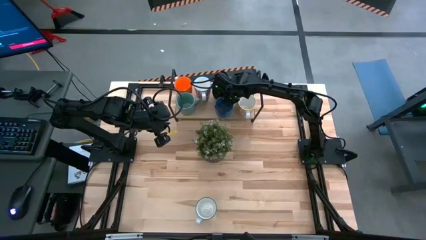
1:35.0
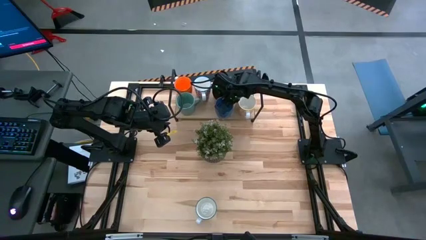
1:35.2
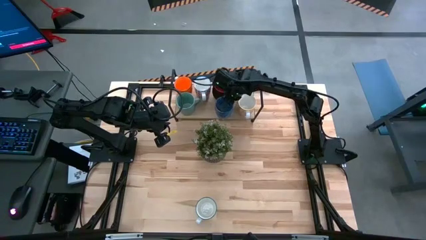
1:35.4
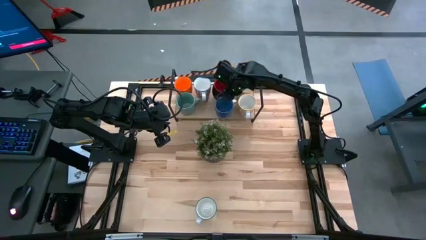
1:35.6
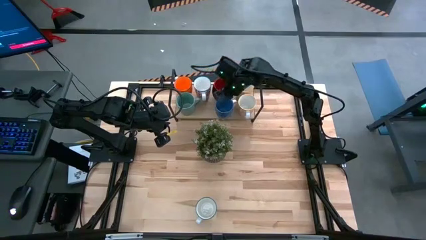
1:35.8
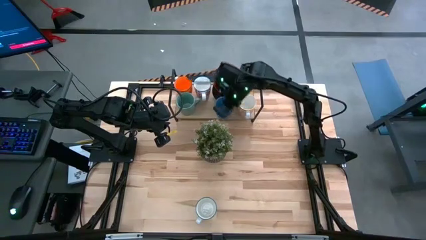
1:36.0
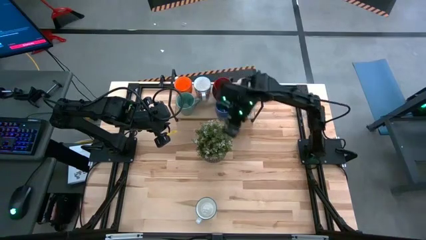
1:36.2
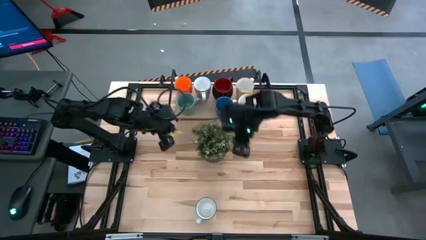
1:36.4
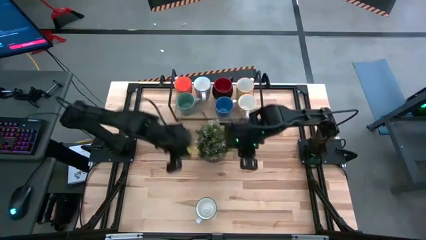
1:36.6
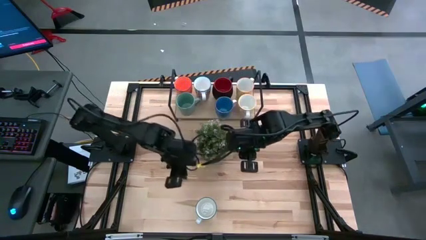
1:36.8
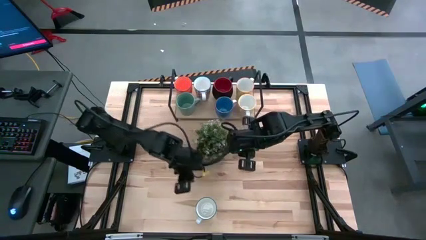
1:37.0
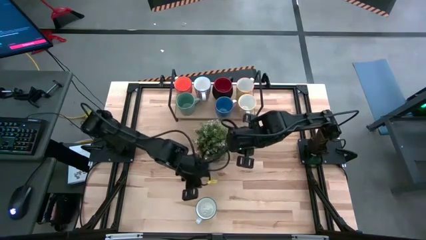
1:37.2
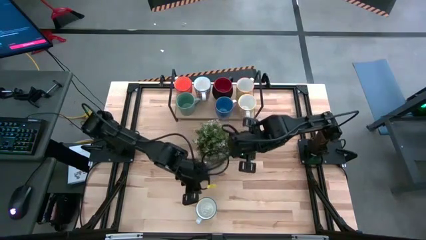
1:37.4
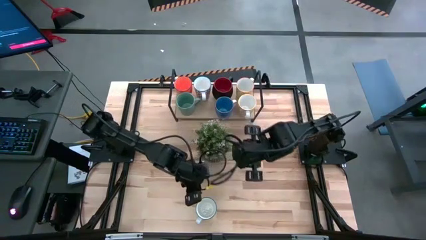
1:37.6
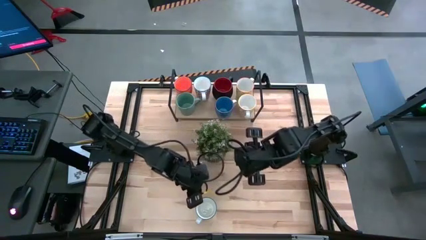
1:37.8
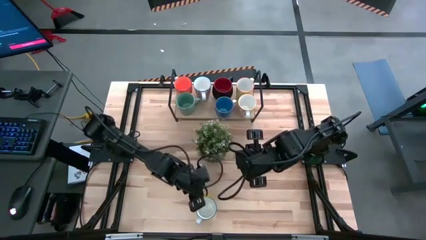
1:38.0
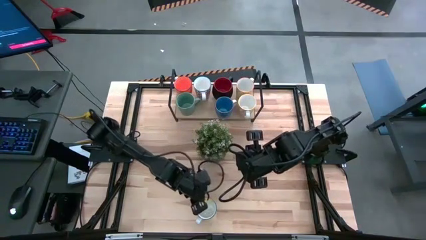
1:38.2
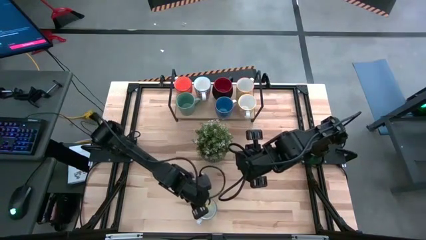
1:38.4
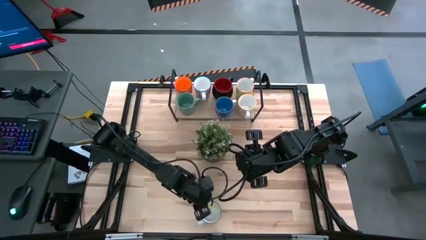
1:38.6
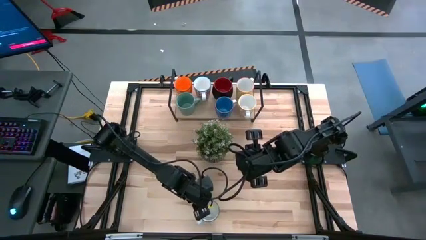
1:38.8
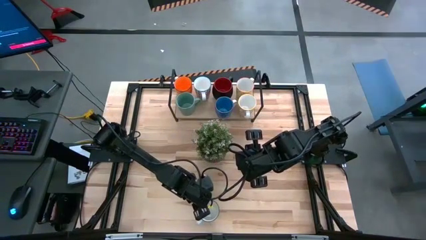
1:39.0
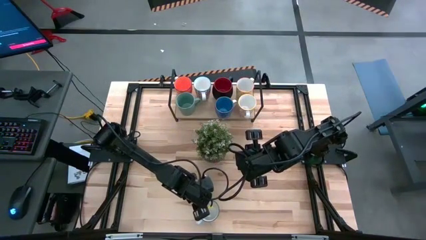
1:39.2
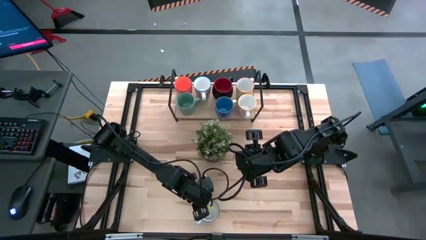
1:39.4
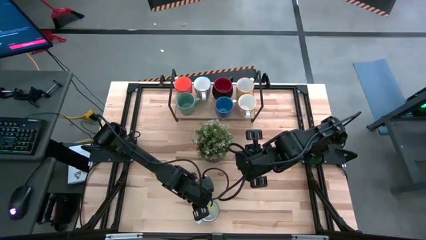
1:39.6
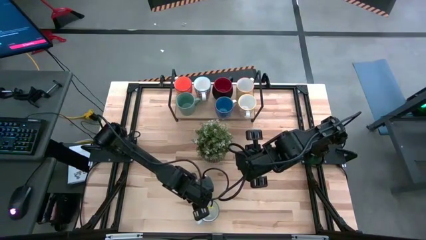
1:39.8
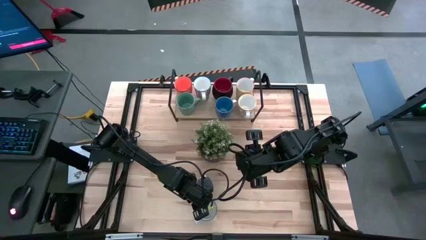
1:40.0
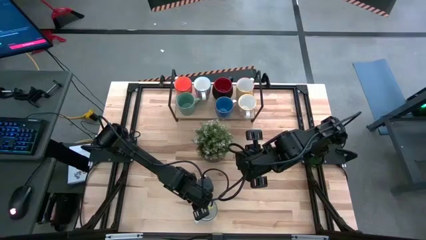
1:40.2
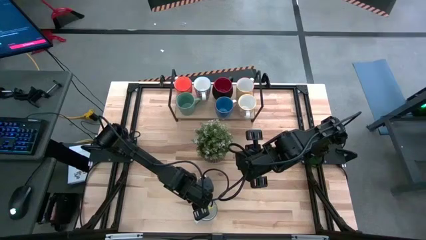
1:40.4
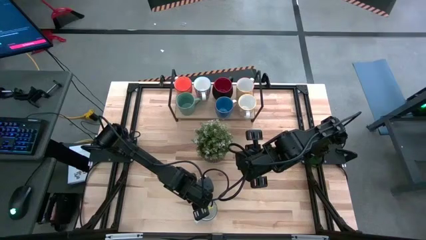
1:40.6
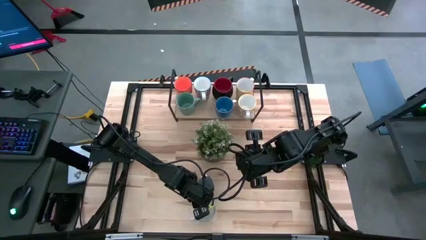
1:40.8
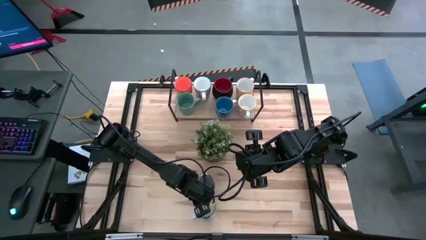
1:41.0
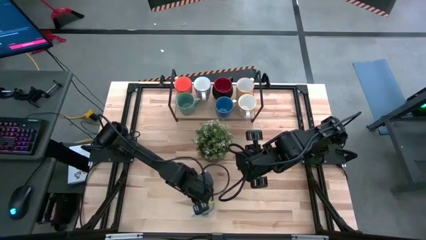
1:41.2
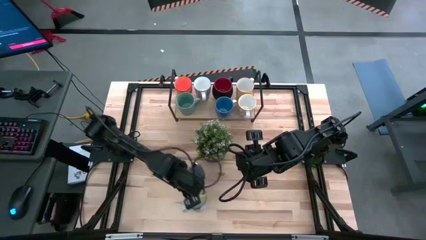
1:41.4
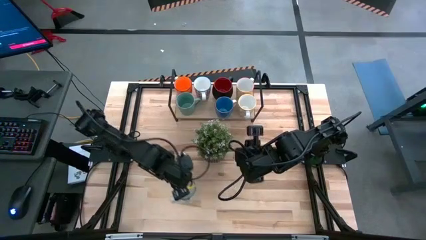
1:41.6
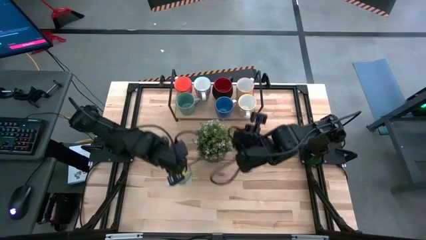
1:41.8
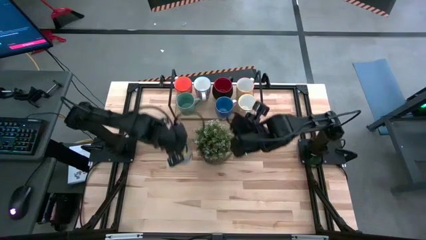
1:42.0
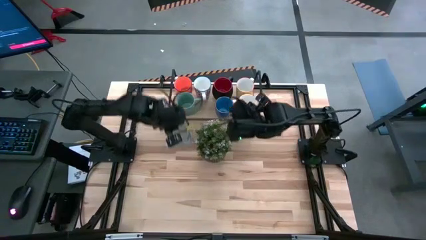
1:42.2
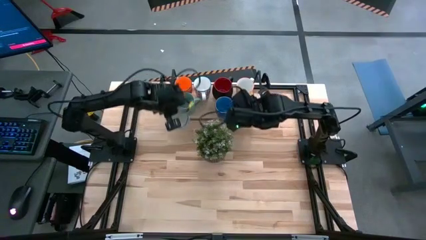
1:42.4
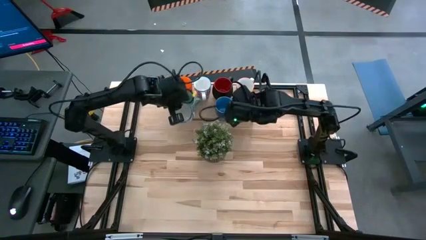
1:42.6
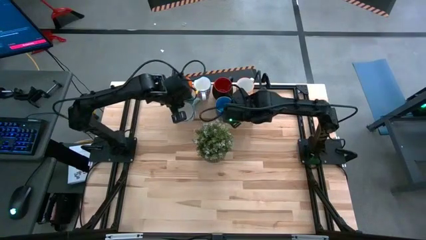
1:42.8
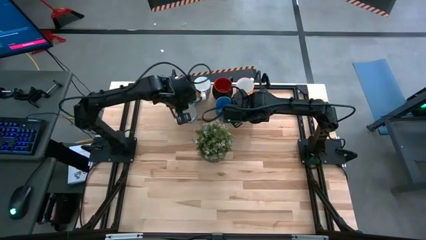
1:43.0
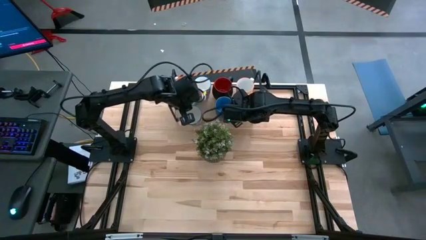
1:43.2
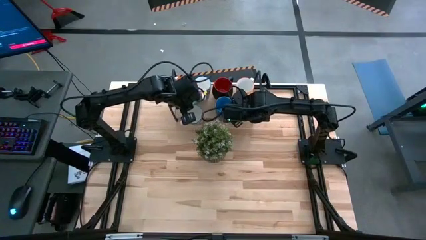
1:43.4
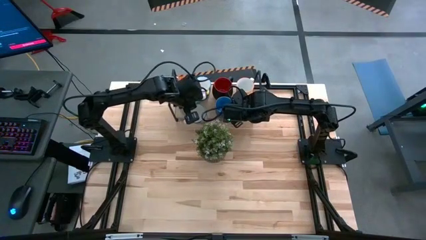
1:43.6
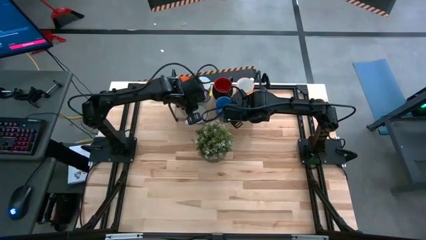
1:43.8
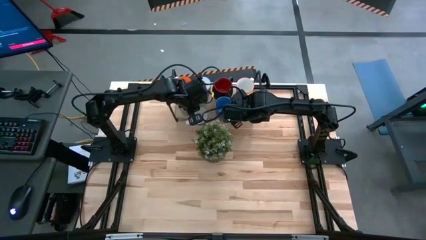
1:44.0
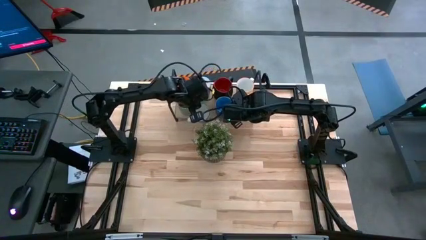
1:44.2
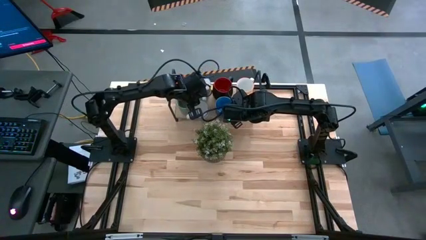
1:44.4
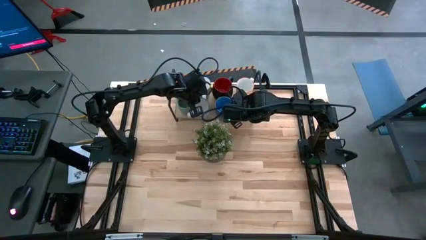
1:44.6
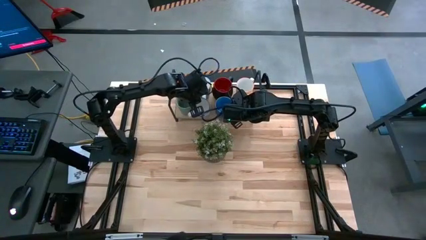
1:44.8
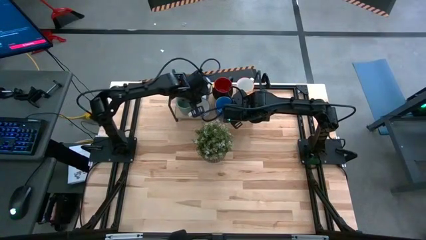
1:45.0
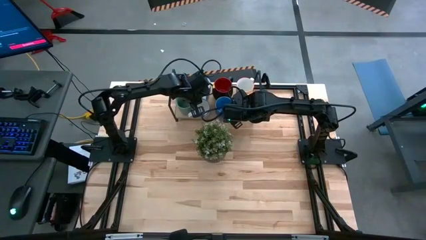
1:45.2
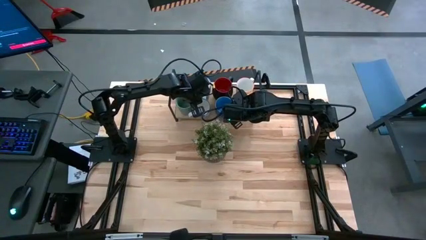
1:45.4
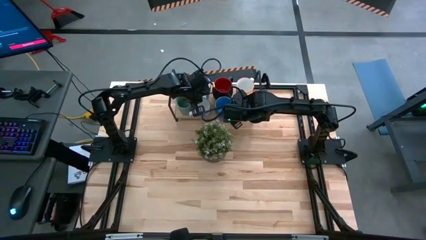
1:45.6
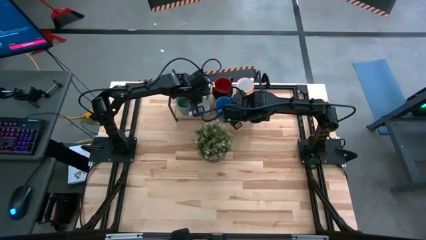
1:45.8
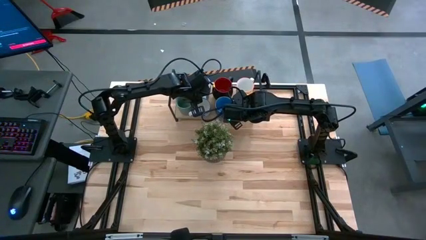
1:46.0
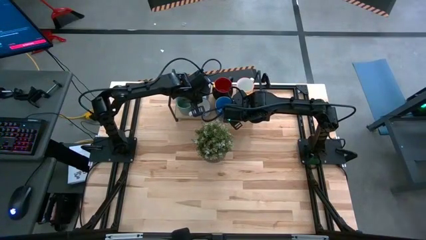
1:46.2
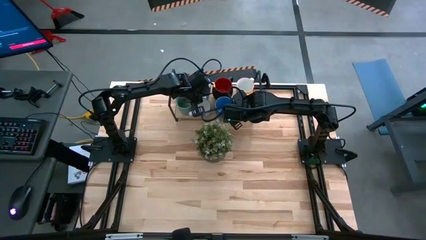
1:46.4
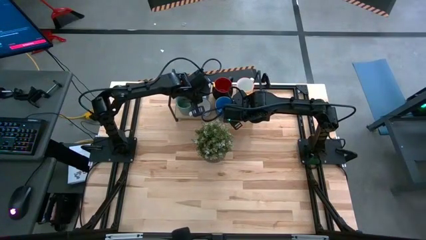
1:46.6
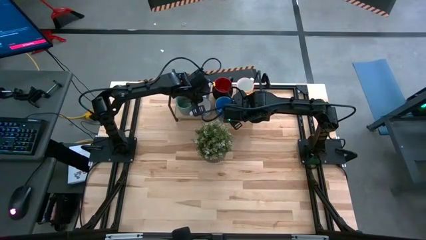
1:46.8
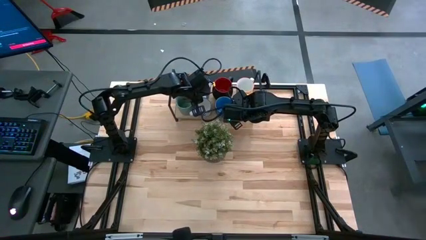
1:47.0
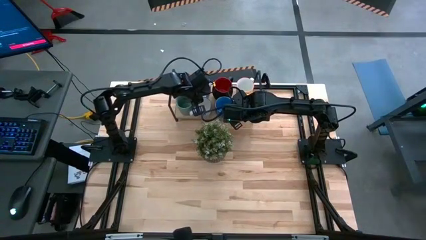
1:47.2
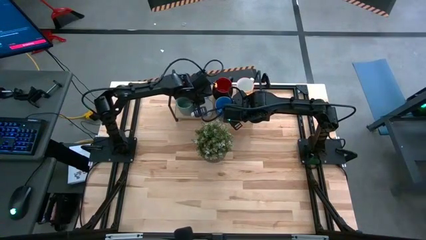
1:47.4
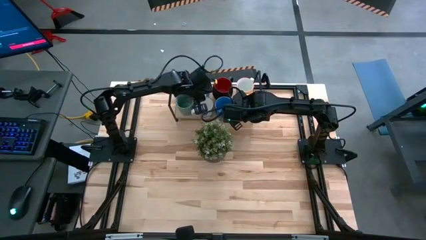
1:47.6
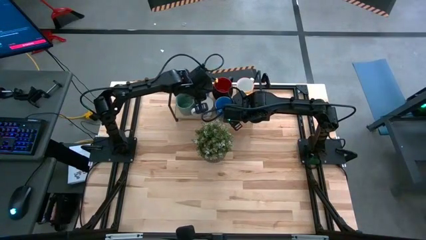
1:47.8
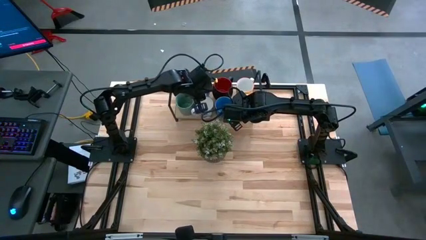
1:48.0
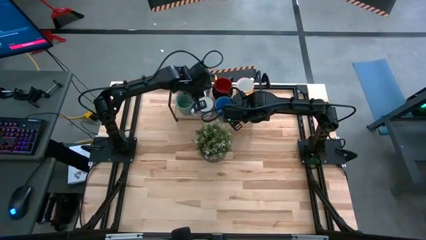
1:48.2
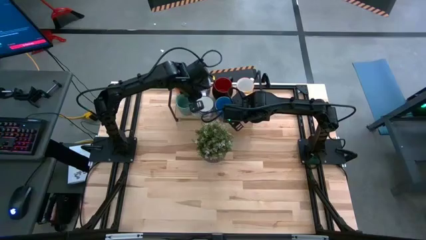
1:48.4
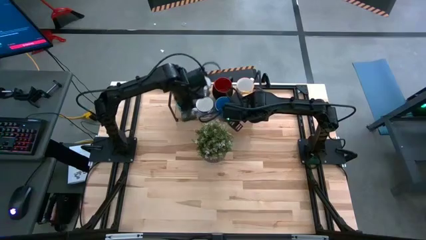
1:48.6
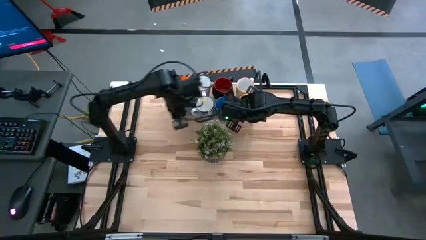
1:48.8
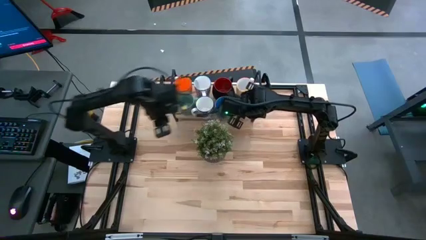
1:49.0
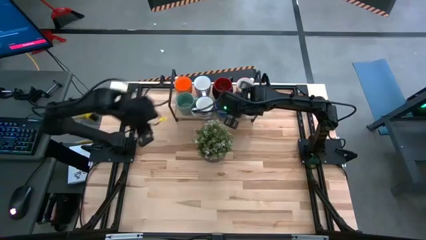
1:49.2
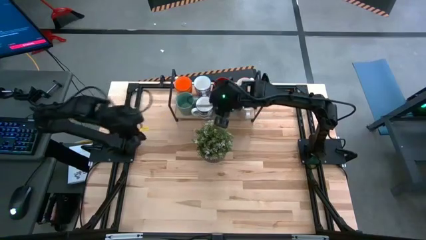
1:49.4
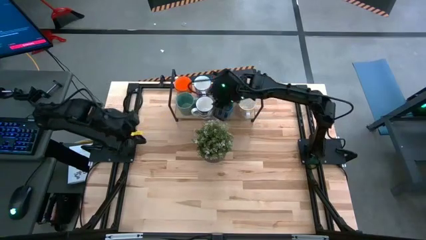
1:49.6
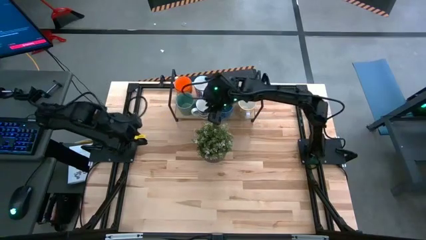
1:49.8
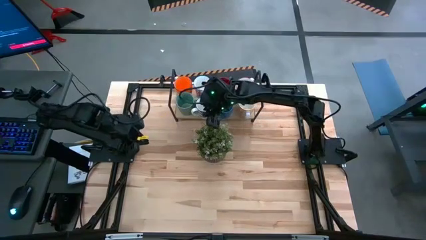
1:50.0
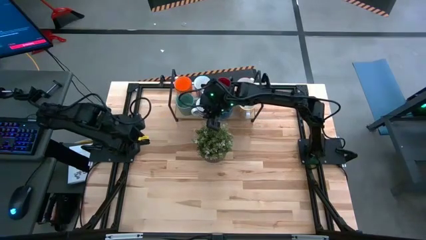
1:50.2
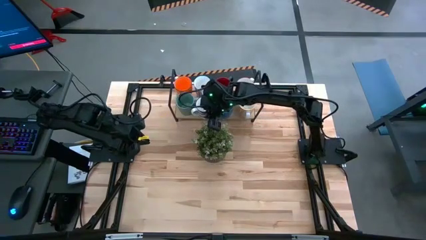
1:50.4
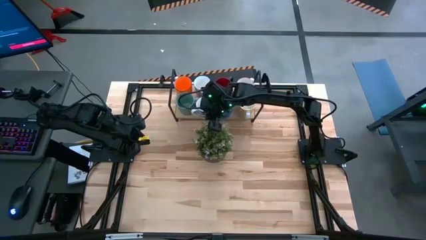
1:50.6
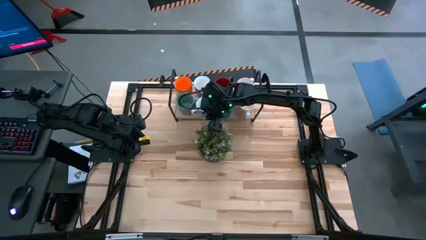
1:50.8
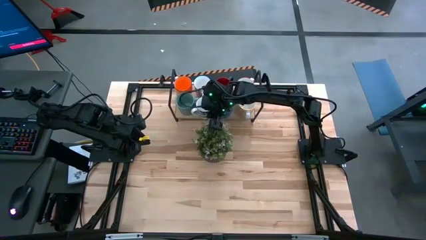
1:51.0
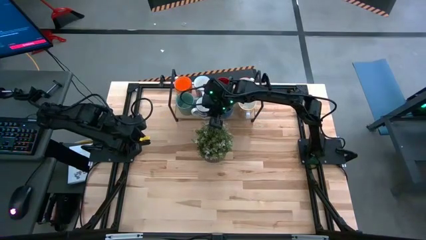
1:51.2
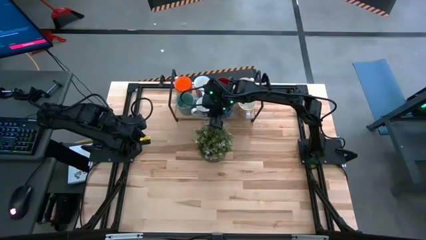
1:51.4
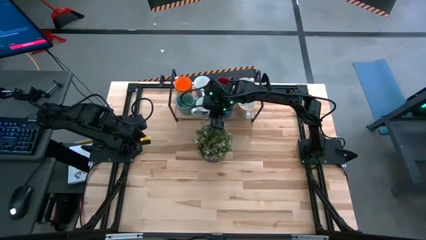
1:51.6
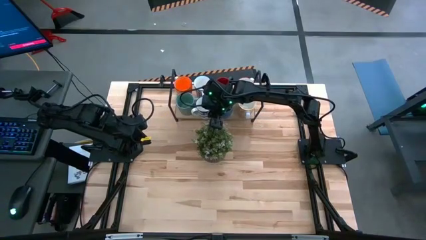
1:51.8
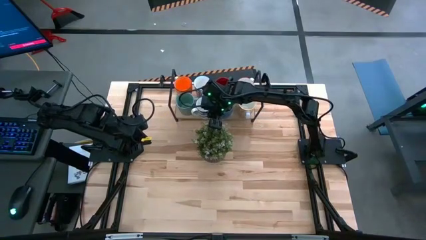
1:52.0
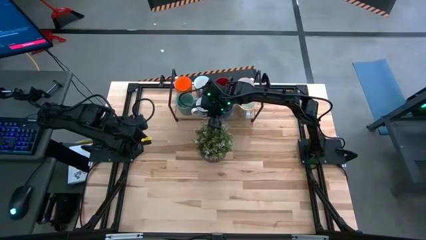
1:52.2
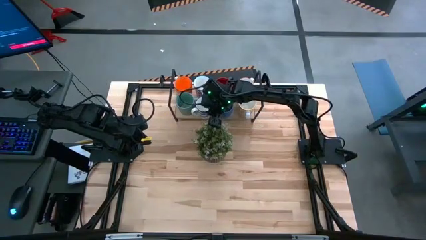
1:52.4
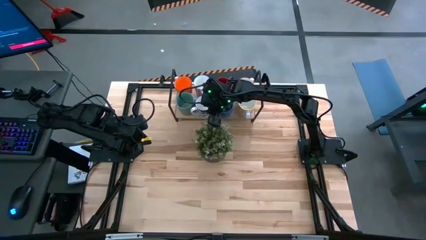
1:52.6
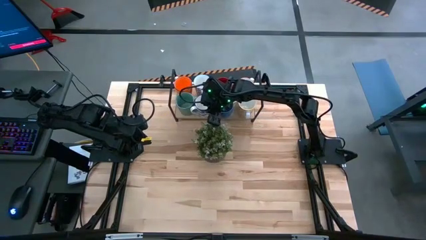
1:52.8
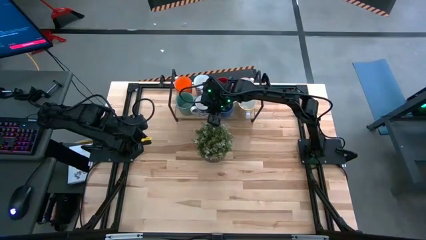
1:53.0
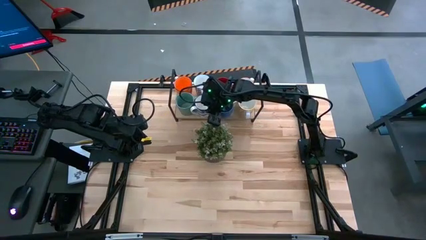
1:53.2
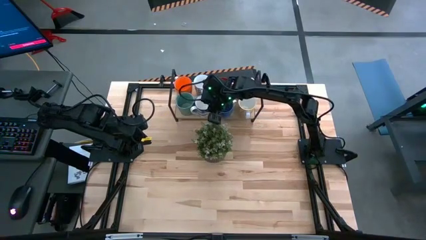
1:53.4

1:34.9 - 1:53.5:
Task: Place coffee mugs
Put the blue patterned mug on the shelf
